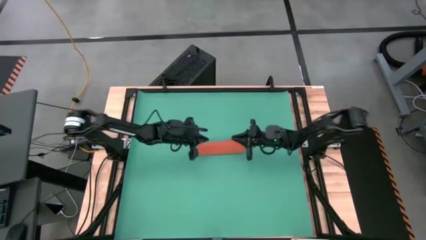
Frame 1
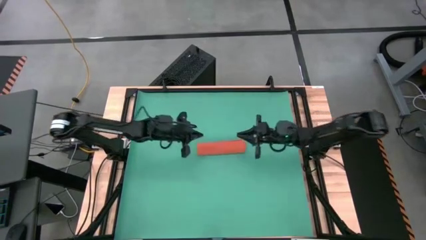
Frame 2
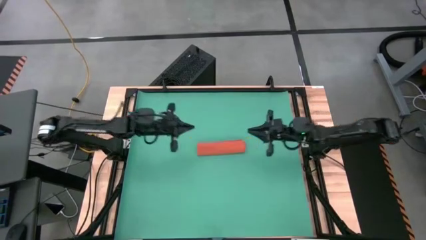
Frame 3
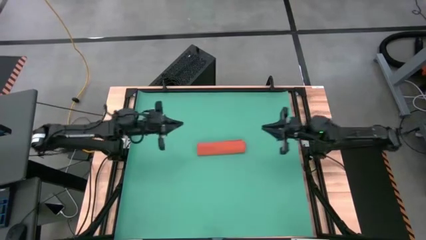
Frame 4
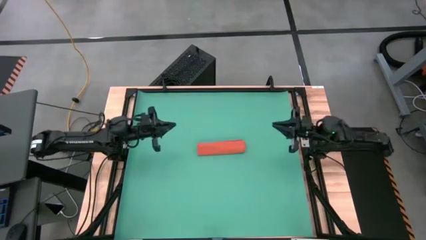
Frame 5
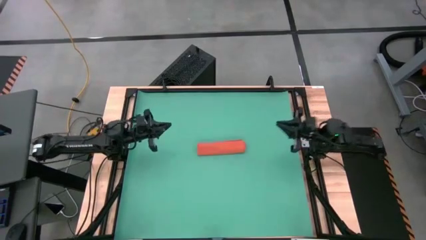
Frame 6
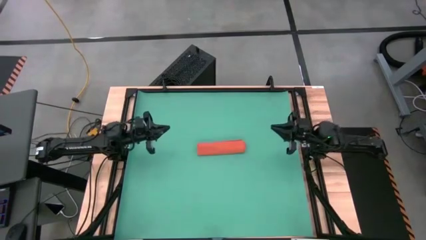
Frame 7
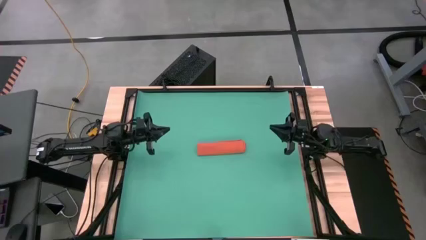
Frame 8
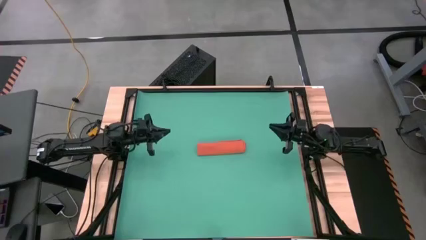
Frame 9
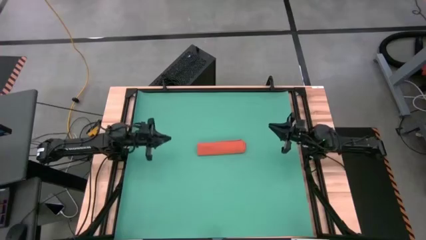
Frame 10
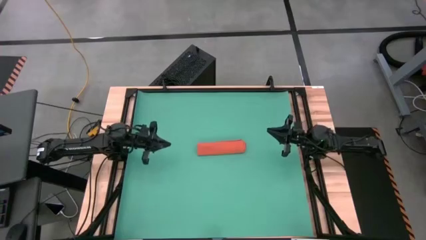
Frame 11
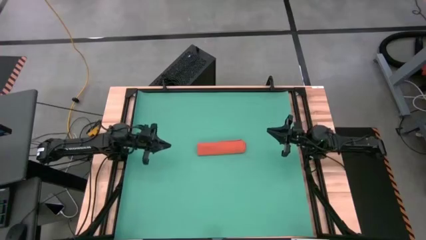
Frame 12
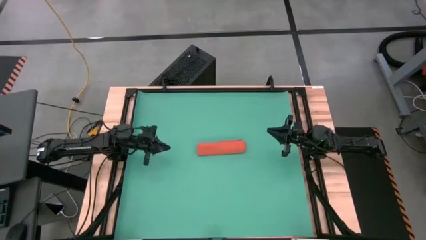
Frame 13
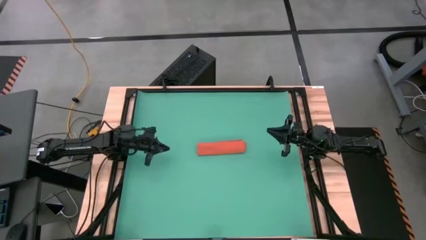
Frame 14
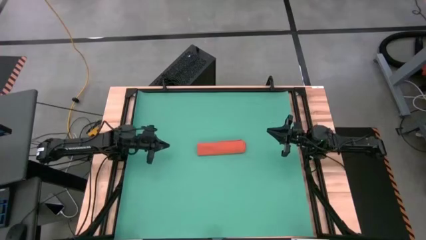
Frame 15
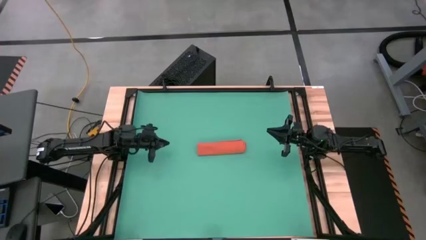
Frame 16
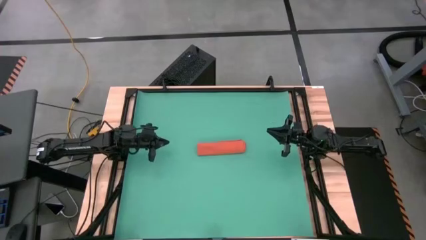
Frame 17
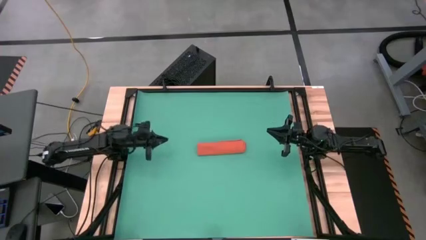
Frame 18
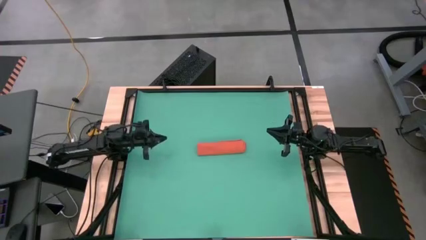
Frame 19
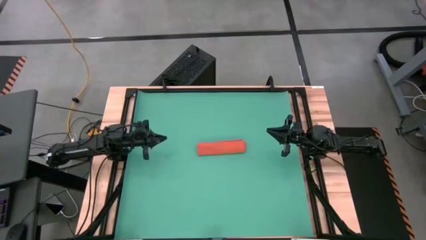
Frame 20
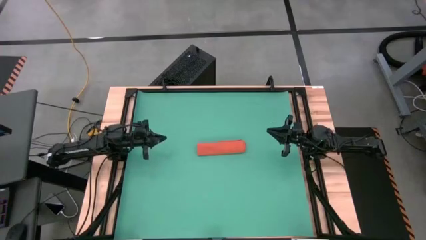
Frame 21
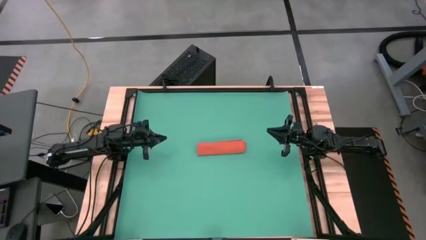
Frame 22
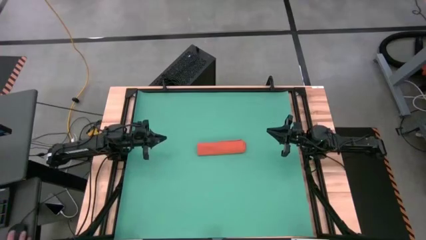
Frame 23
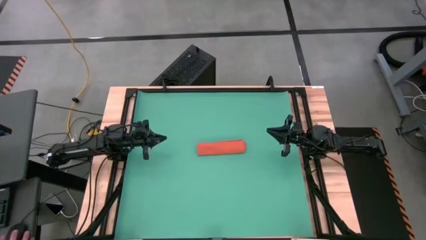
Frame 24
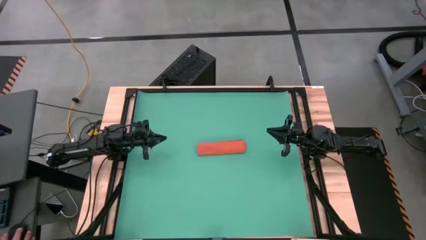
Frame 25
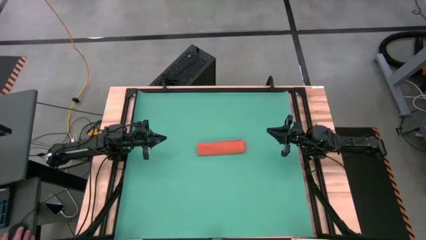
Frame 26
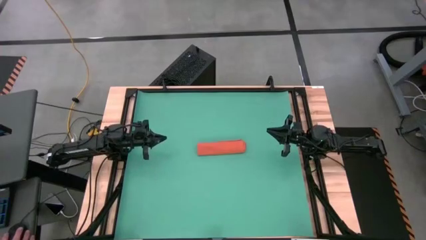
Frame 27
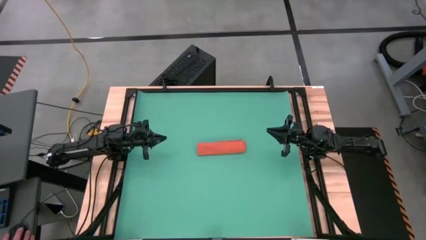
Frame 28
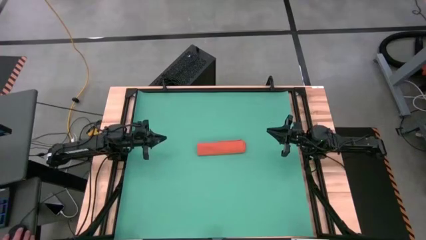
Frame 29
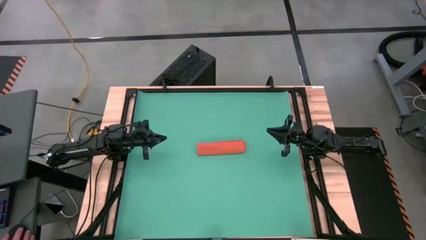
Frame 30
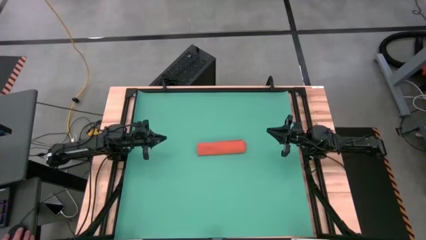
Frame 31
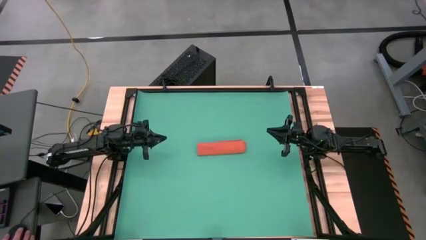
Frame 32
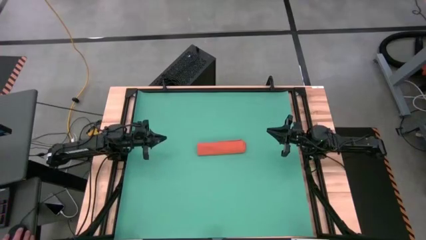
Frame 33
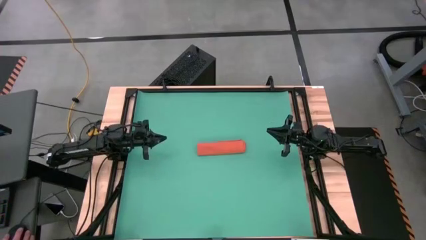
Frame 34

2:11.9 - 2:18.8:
Task: Roll towel
Return to Home Position
